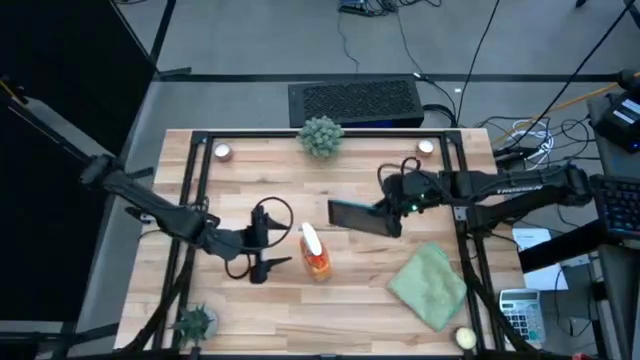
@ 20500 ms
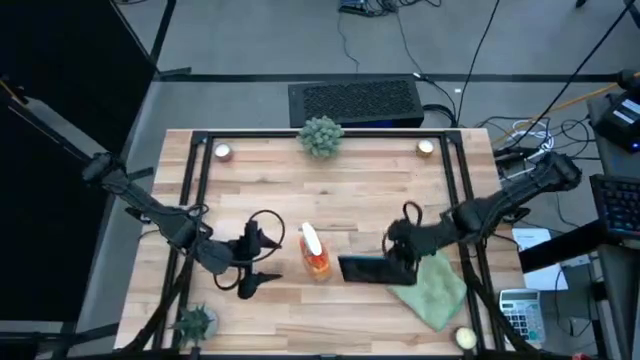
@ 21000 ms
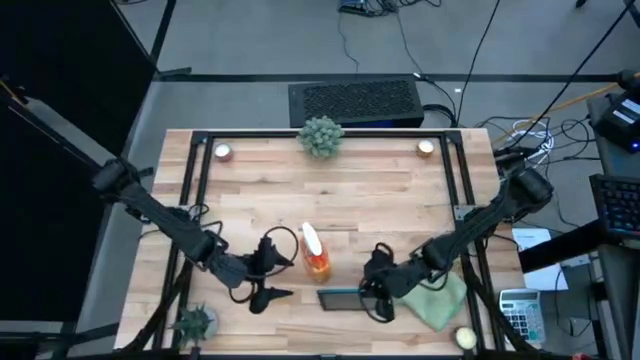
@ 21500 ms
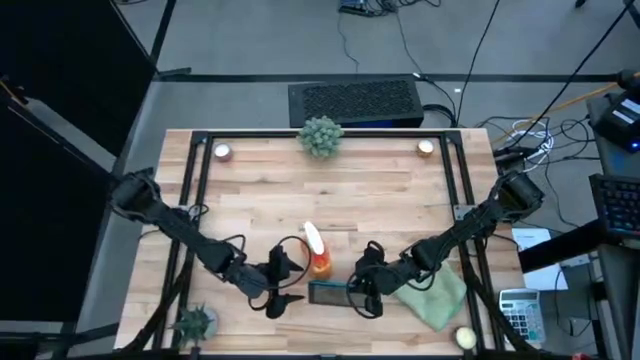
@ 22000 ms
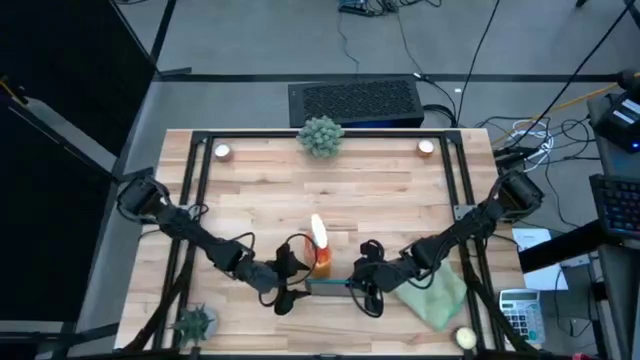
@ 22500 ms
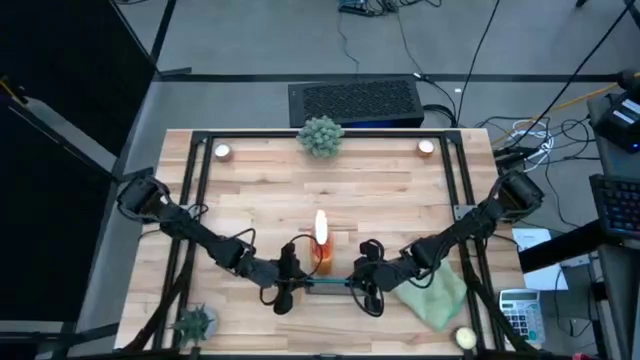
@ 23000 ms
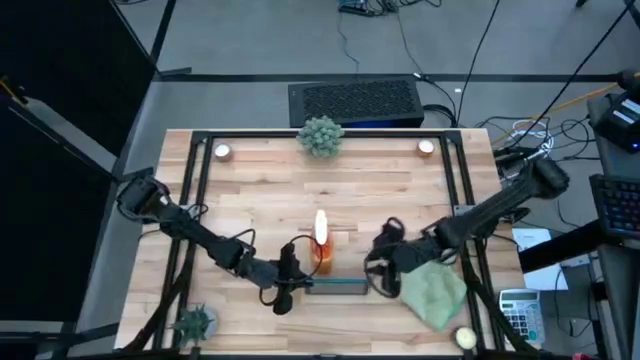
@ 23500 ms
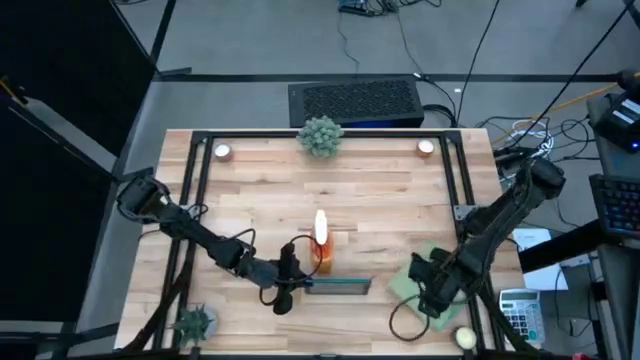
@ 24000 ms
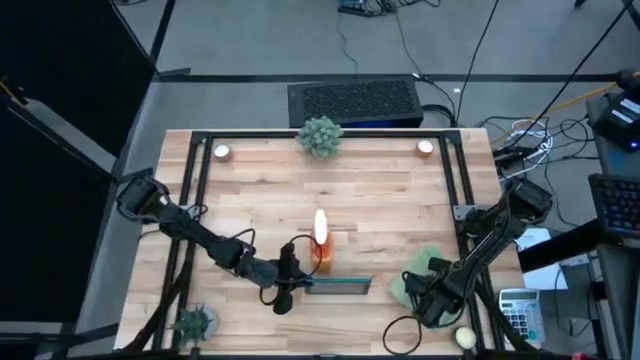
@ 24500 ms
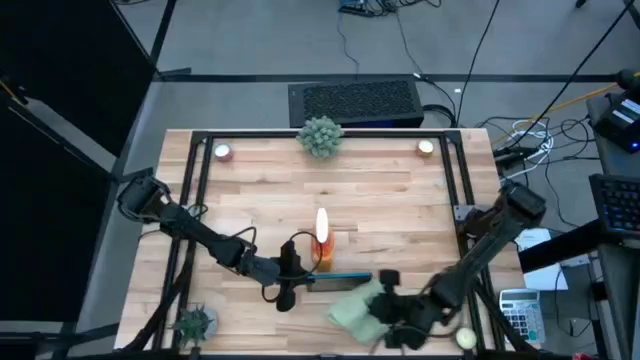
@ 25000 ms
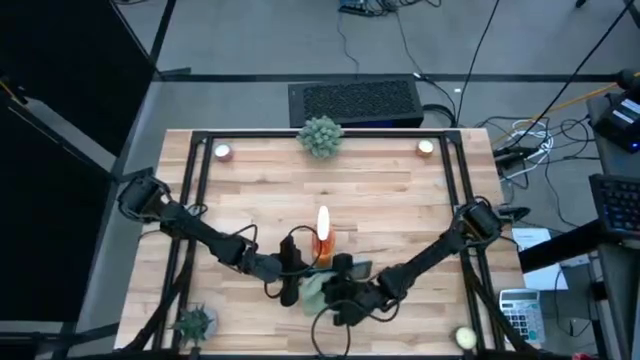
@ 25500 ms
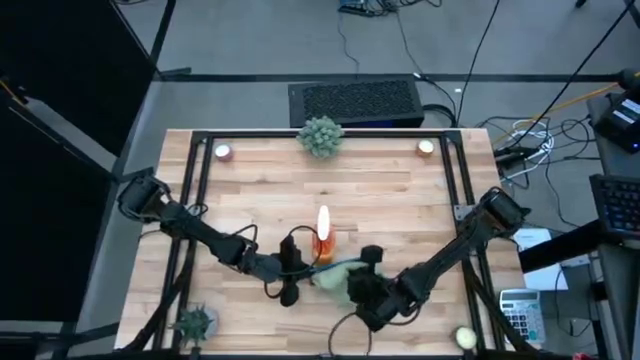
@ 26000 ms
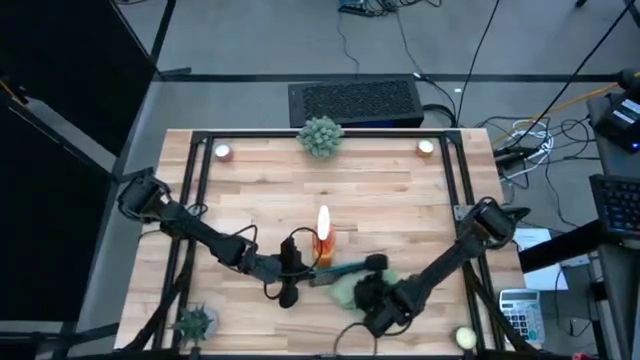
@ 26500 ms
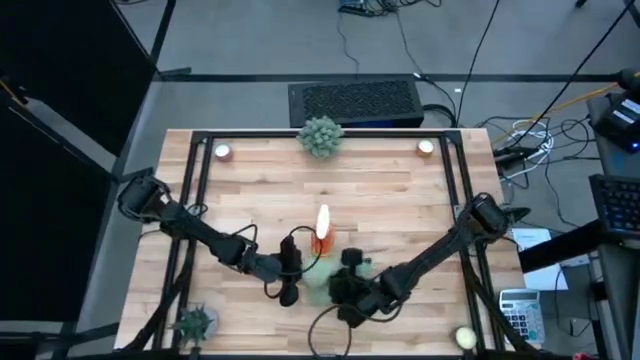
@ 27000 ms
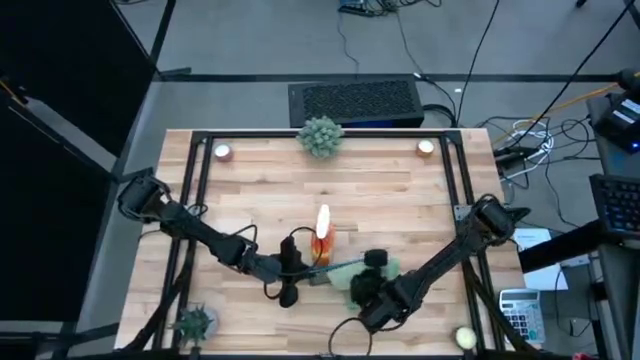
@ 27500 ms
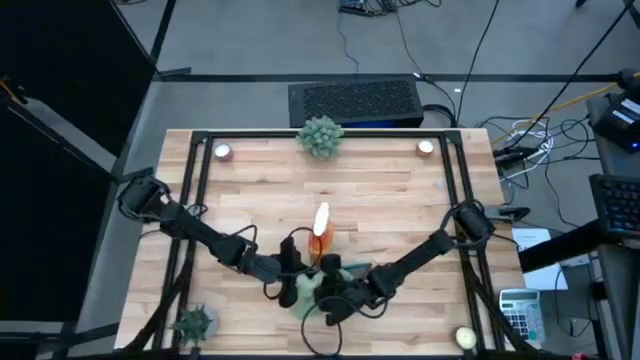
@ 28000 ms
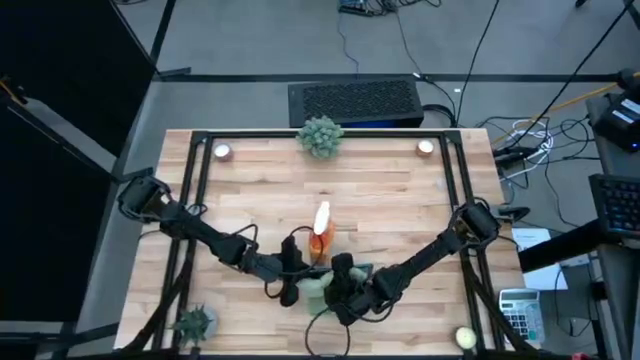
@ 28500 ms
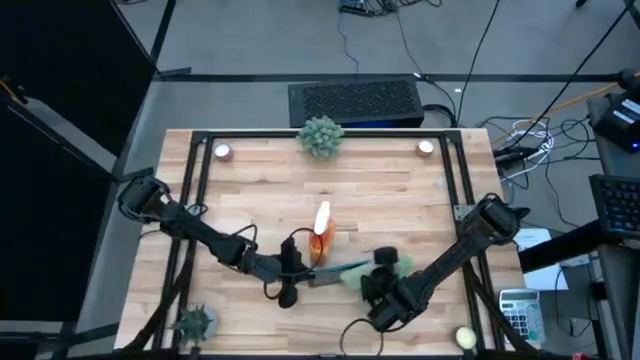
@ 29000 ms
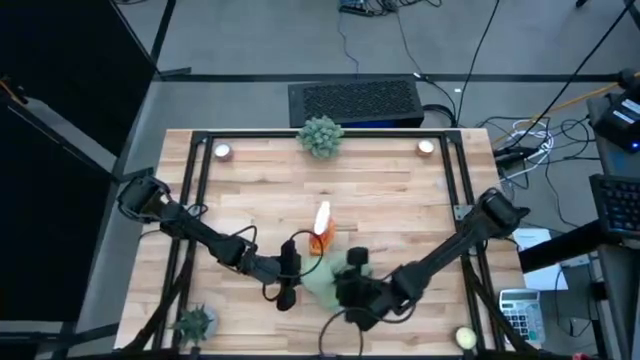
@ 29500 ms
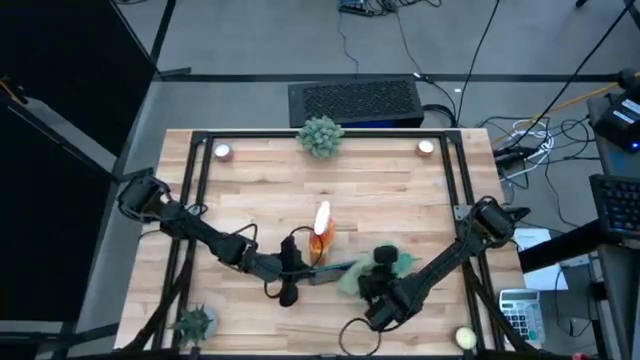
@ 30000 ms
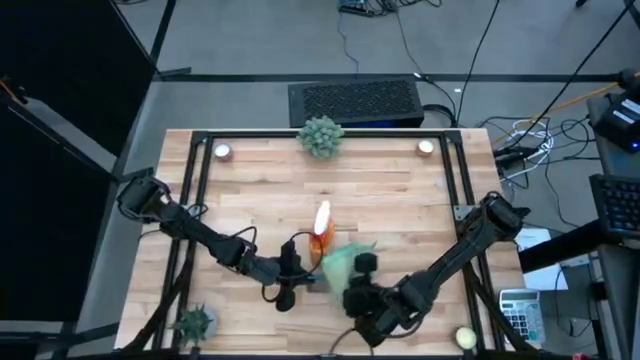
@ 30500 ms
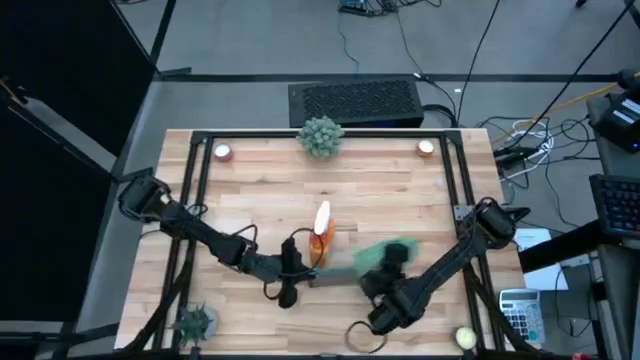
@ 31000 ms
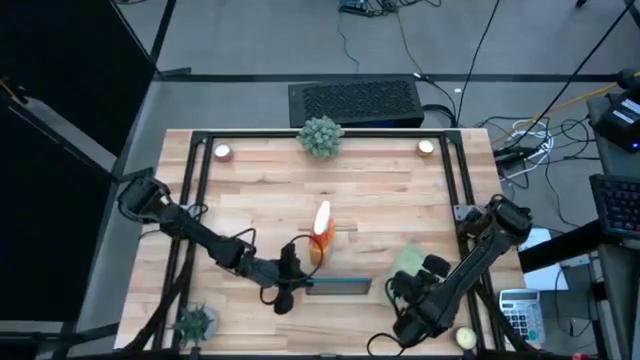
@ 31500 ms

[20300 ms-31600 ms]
Task: Apply microfiber cloth
Wipe the front of the tablet using the green microfiber cloth

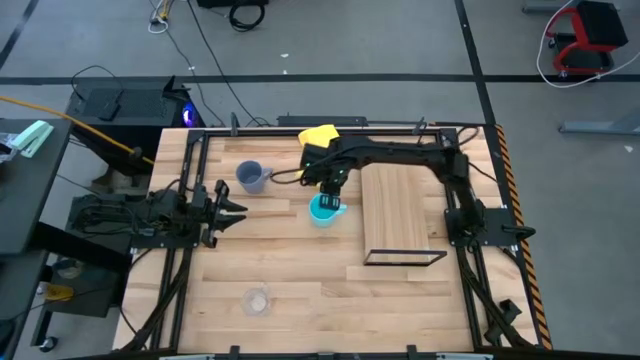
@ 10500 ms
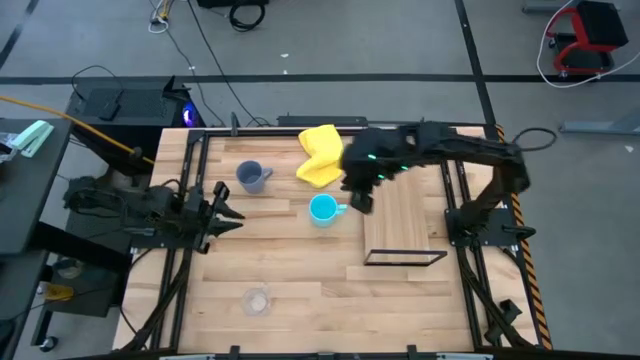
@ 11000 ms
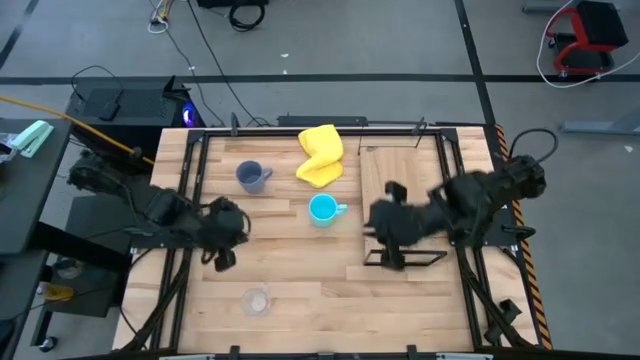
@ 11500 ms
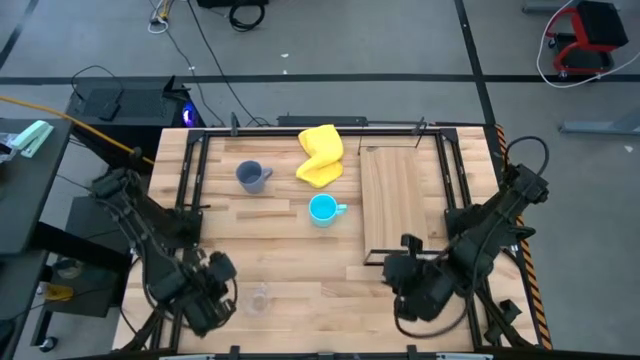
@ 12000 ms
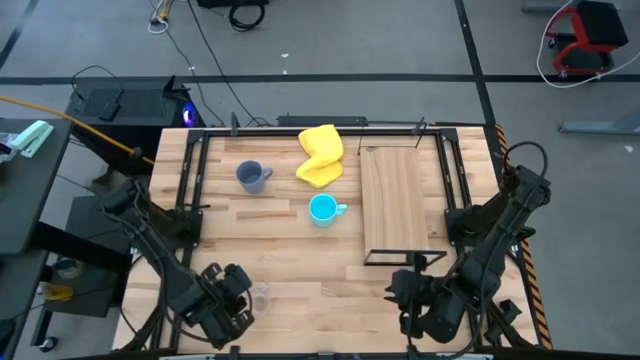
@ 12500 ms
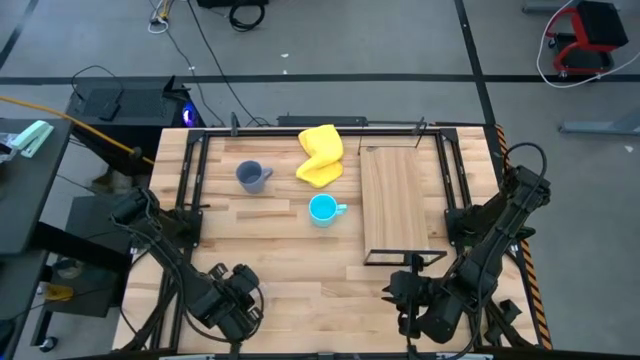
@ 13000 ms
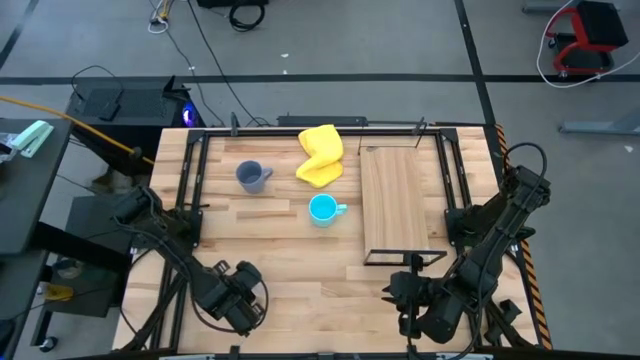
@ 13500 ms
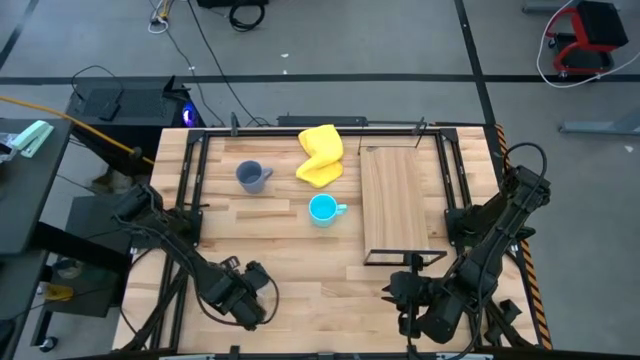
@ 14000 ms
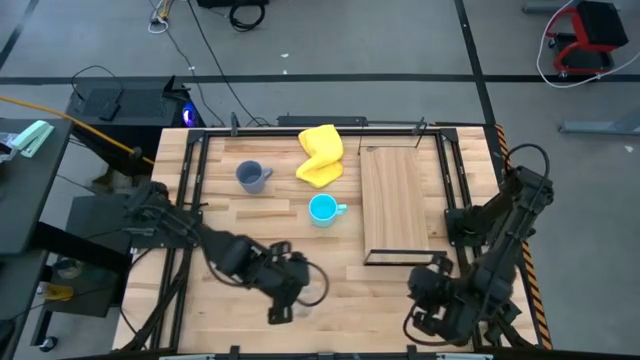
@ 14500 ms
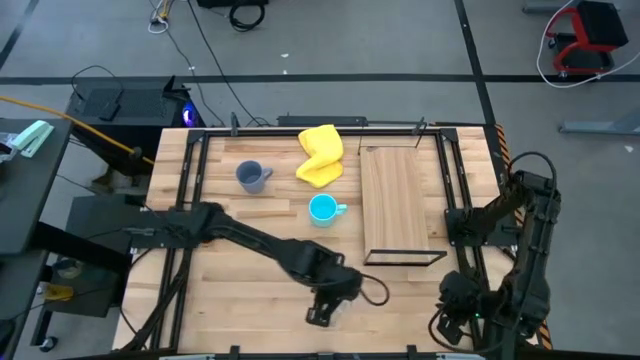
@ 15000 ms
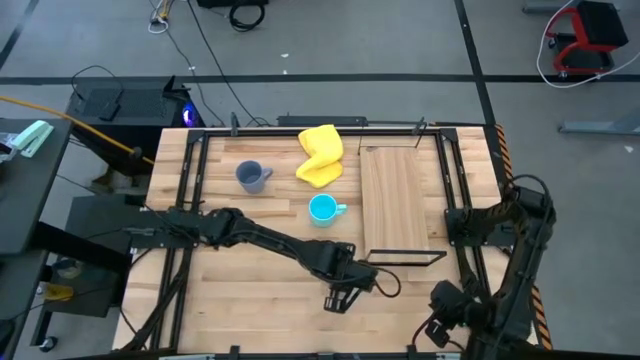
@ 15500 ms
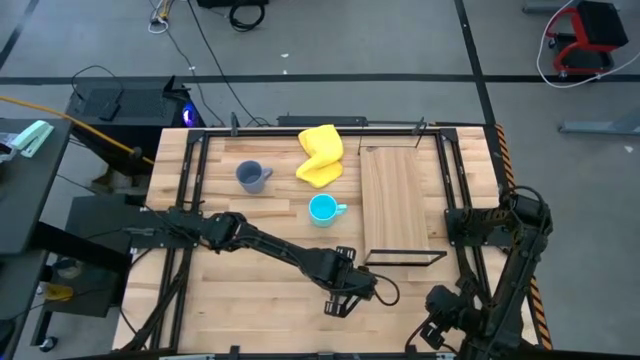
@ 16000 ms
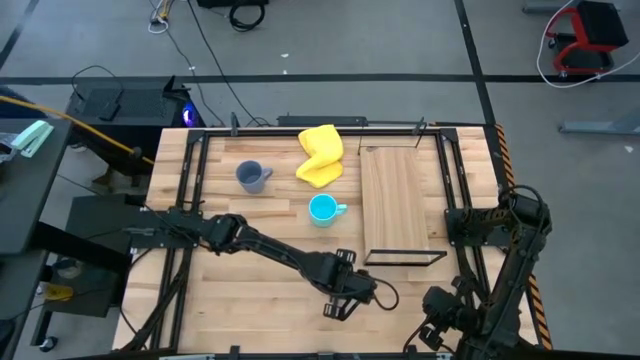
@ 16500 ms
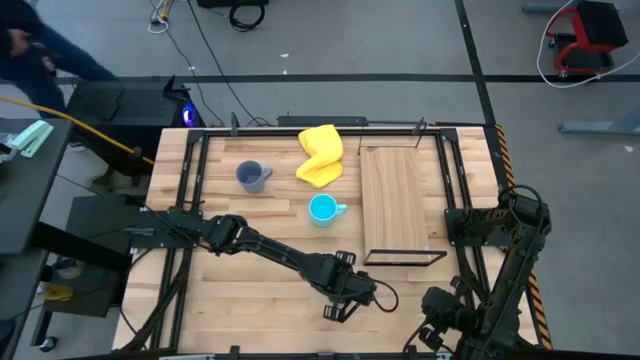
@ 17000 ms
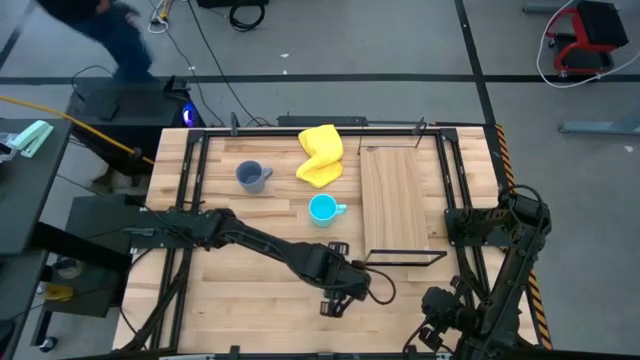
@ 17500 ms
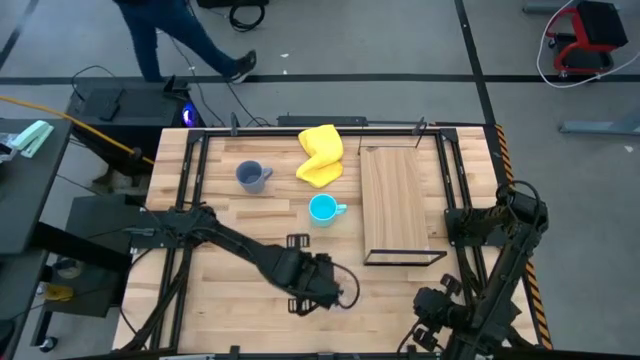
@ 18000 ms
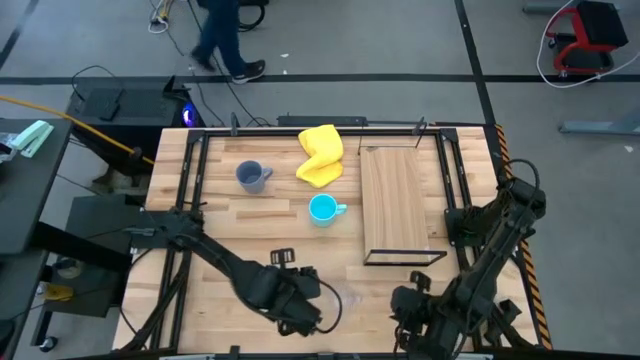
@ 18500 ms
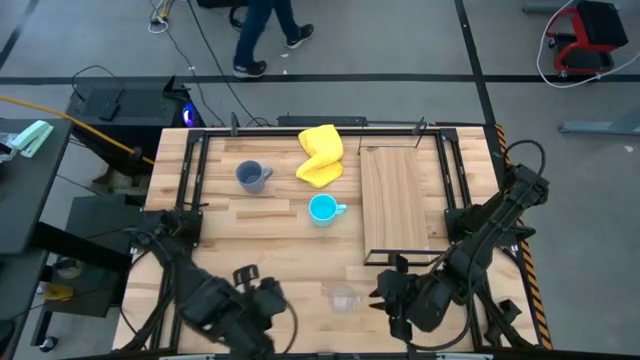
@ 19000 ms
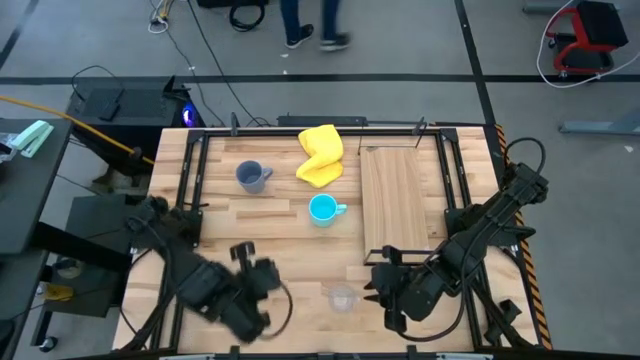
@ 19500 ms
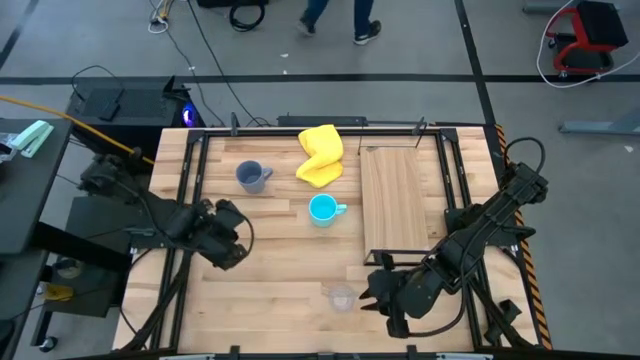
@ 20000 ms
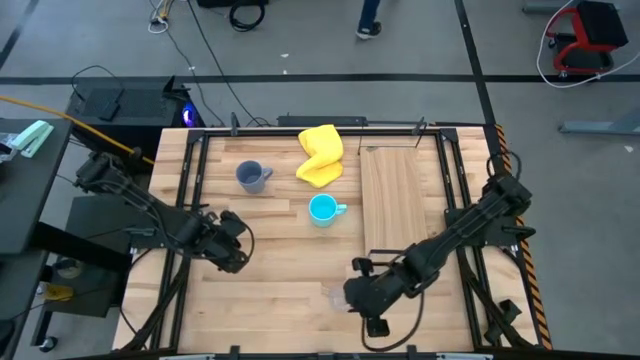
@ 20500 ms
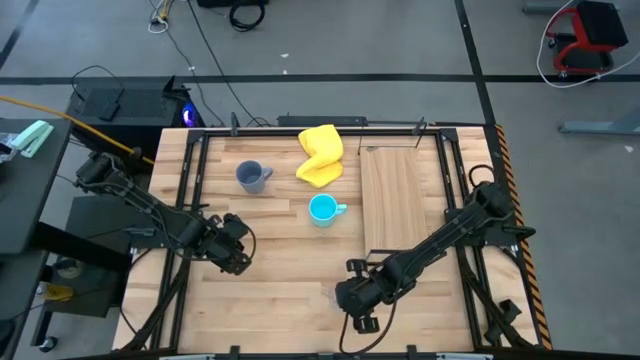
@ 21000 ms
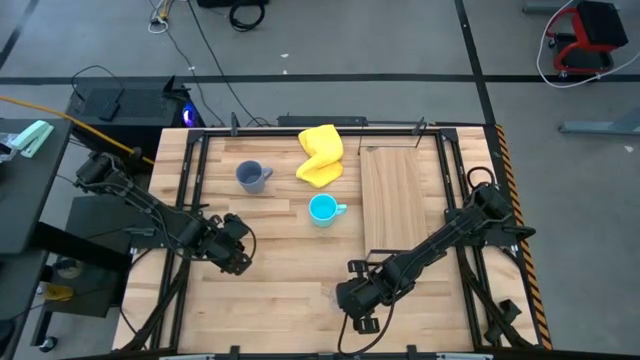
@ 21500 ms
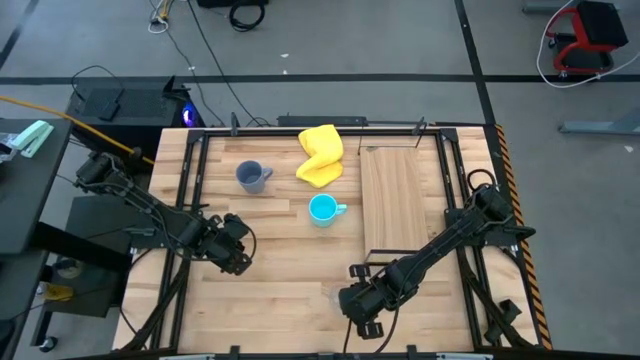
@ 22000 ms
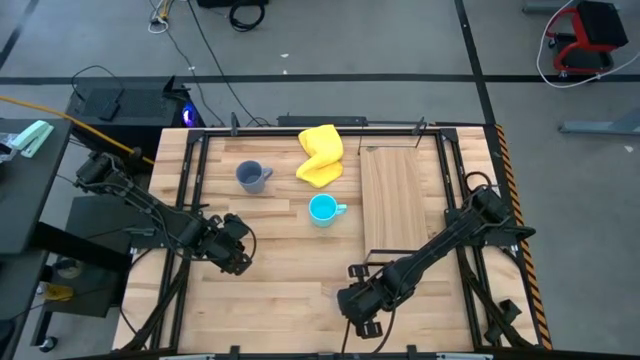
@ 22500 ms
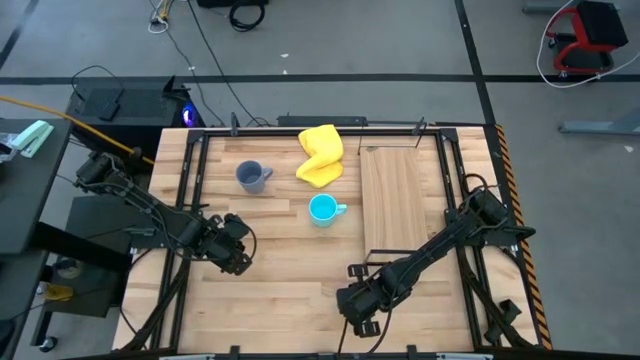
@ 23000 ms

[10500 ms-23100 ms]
Task: Stack small to large cups/mugs on shelf
Put the transparent mug on the shelf
